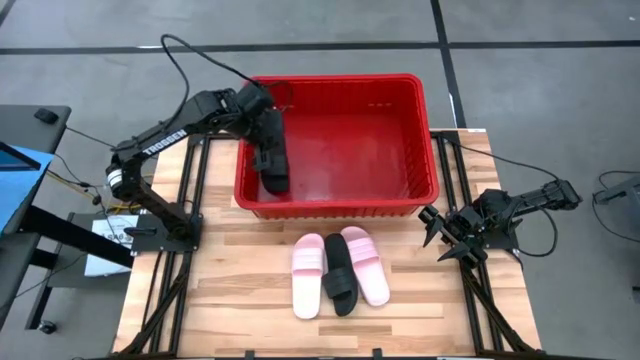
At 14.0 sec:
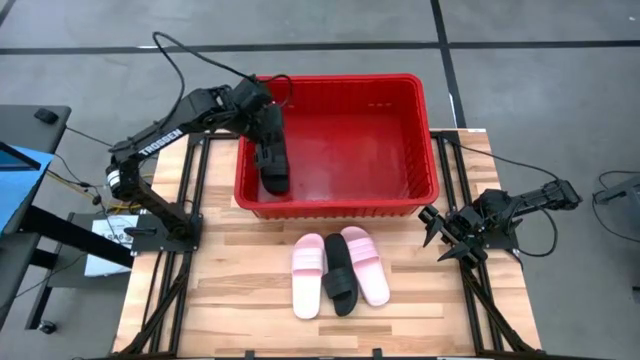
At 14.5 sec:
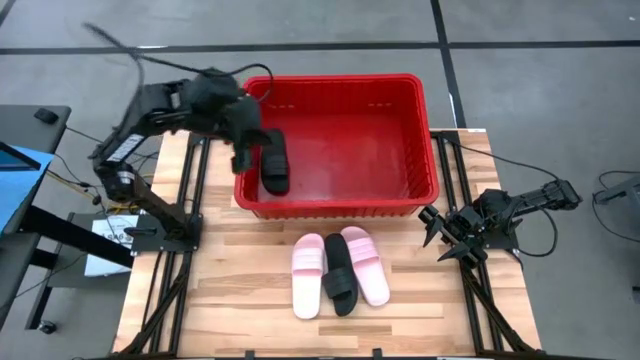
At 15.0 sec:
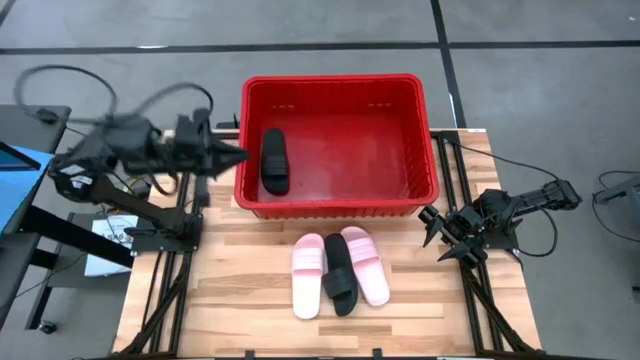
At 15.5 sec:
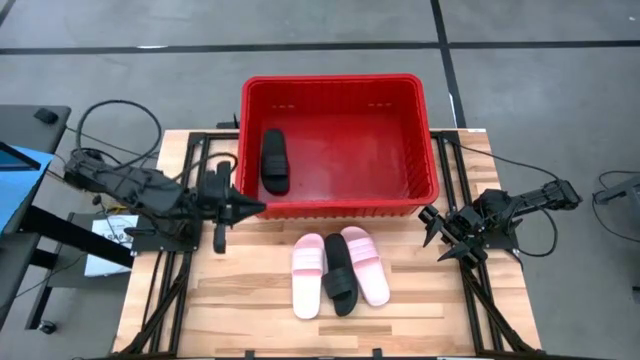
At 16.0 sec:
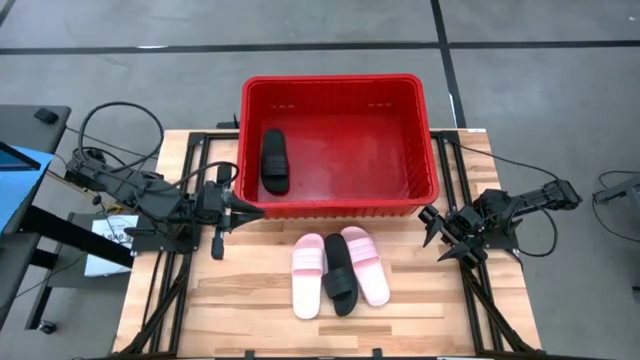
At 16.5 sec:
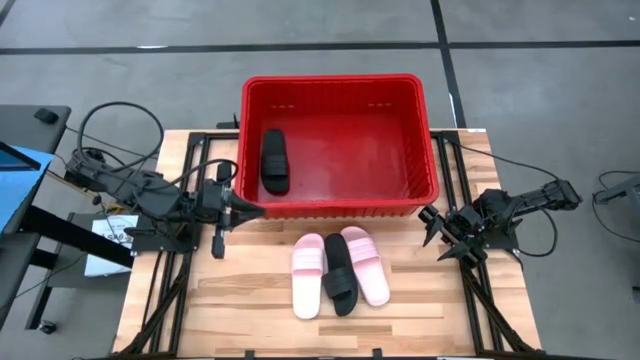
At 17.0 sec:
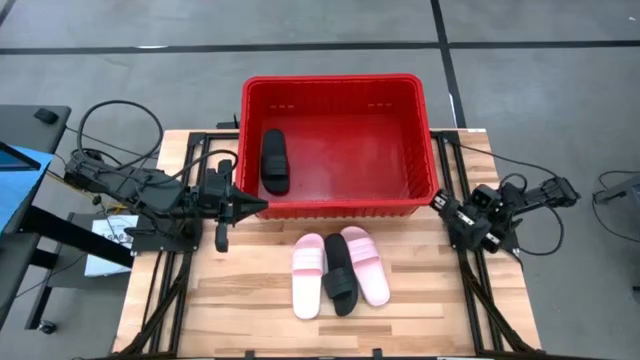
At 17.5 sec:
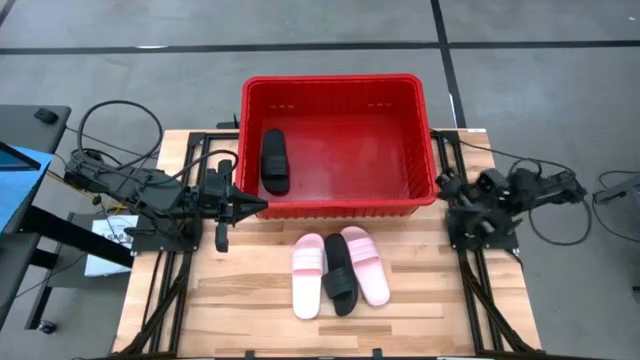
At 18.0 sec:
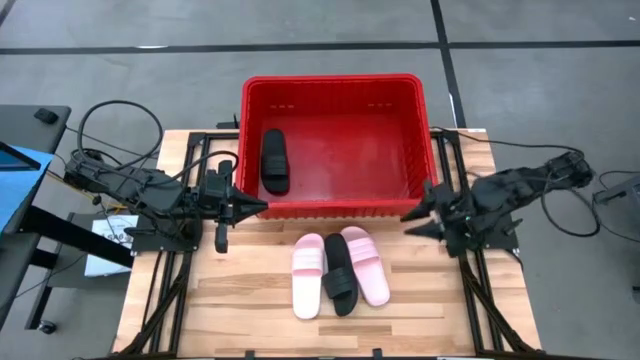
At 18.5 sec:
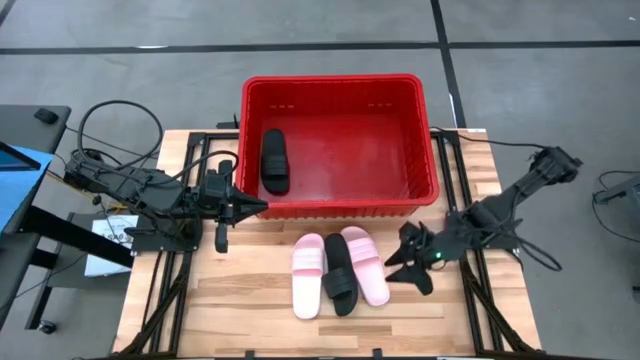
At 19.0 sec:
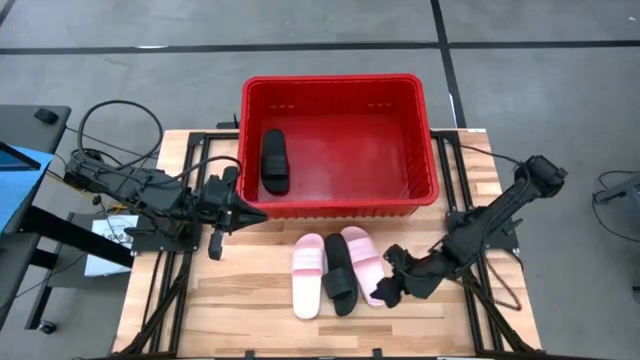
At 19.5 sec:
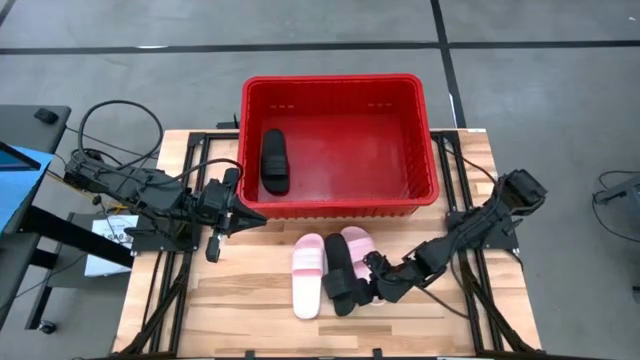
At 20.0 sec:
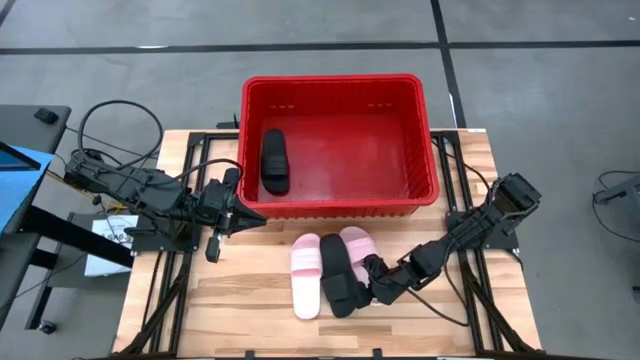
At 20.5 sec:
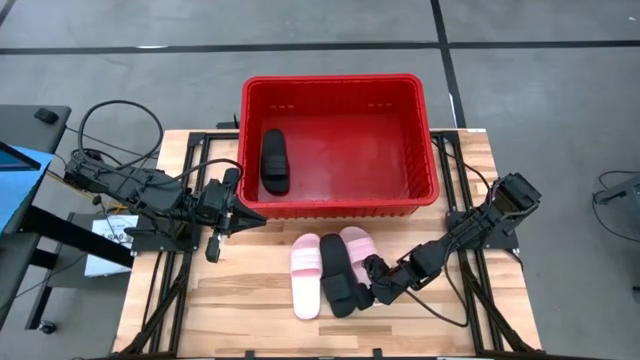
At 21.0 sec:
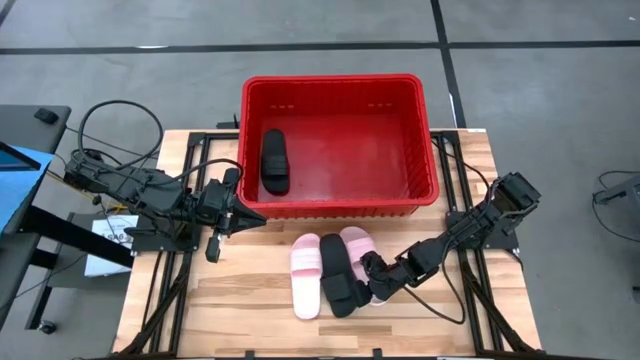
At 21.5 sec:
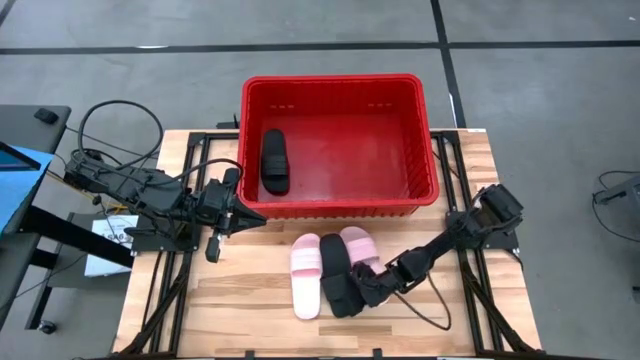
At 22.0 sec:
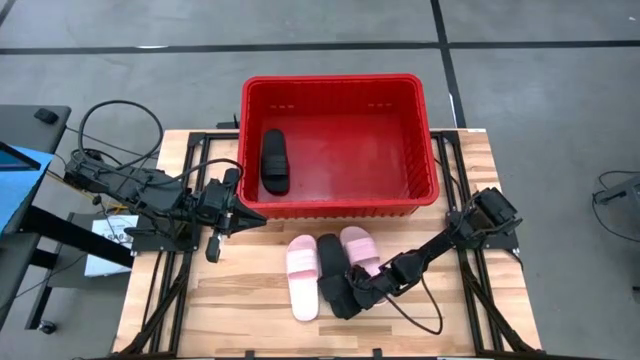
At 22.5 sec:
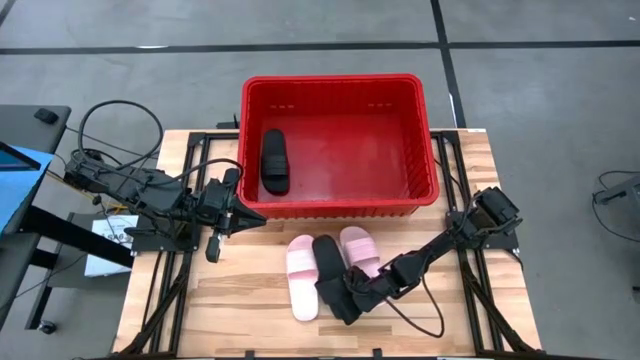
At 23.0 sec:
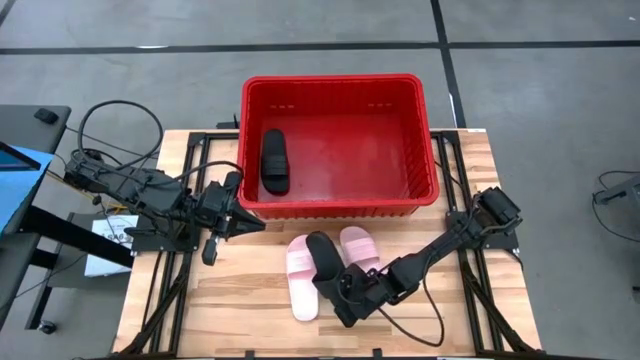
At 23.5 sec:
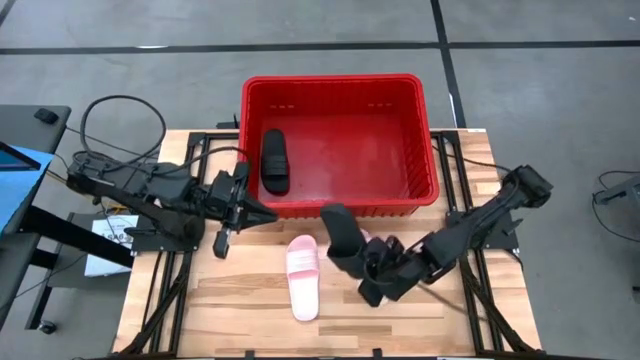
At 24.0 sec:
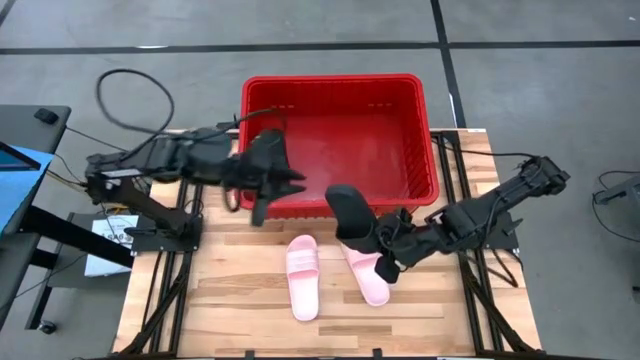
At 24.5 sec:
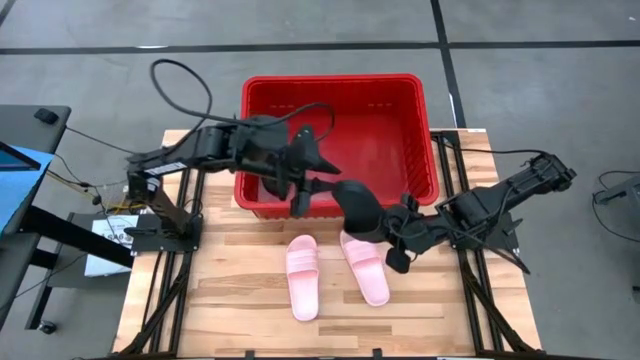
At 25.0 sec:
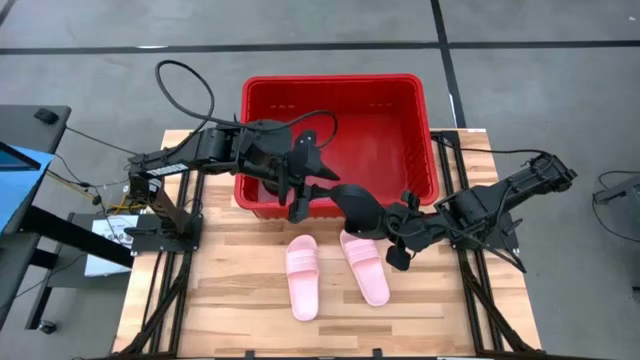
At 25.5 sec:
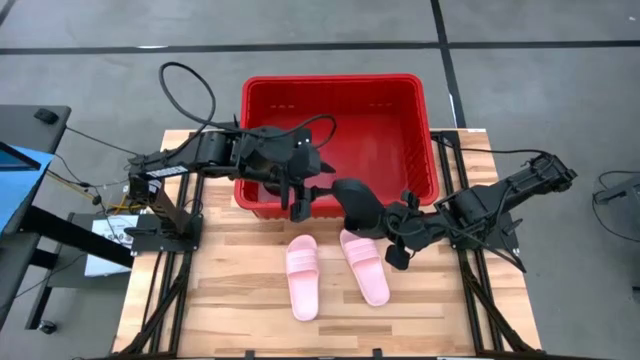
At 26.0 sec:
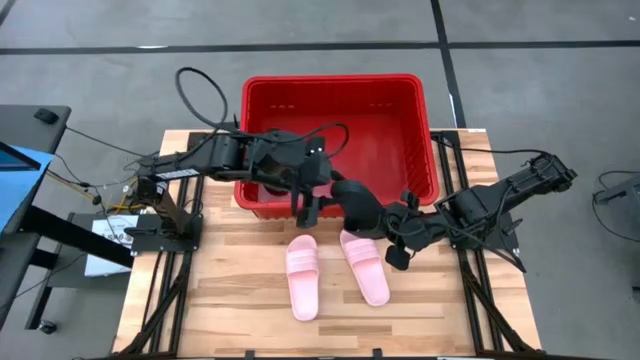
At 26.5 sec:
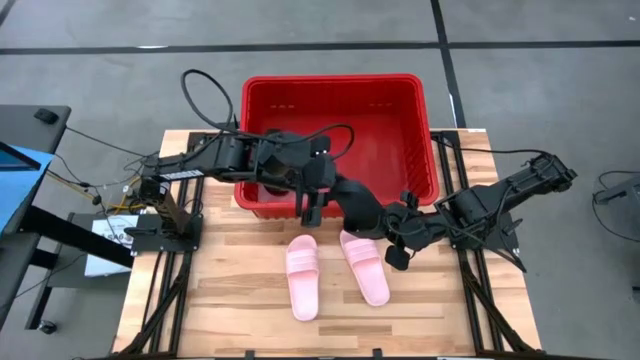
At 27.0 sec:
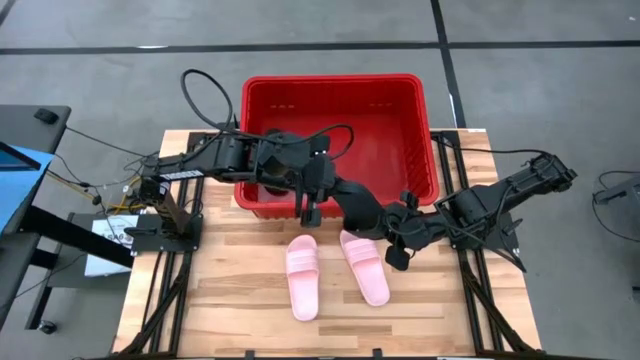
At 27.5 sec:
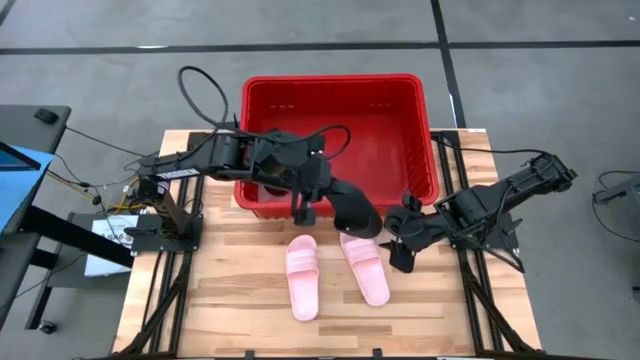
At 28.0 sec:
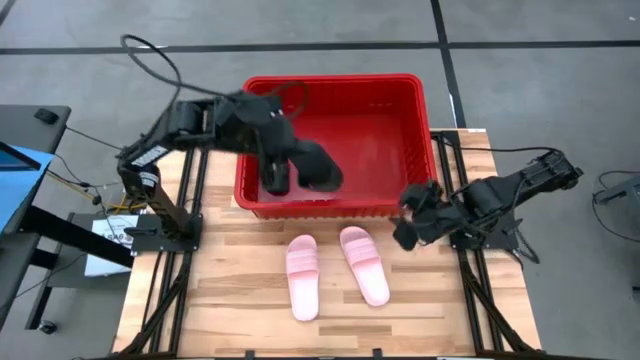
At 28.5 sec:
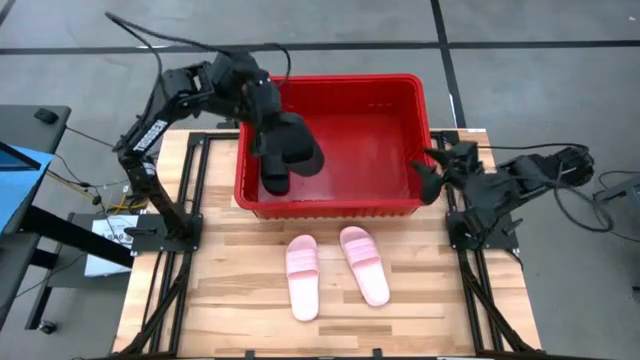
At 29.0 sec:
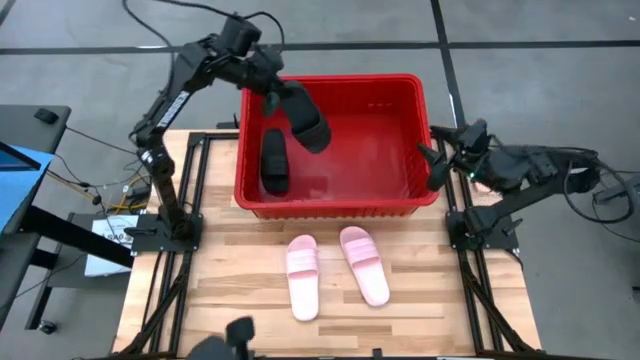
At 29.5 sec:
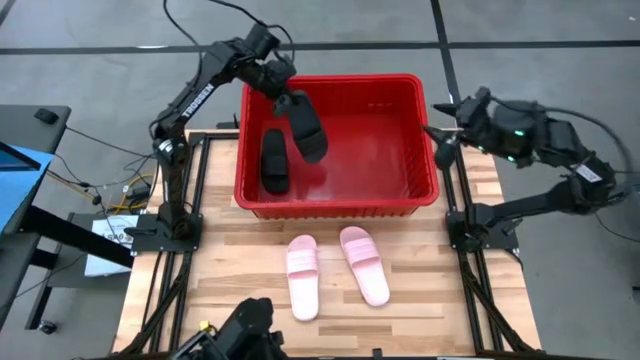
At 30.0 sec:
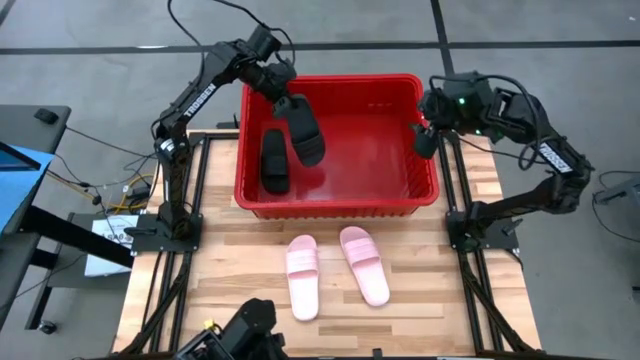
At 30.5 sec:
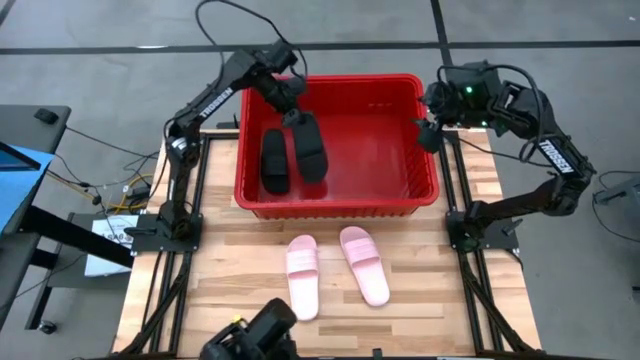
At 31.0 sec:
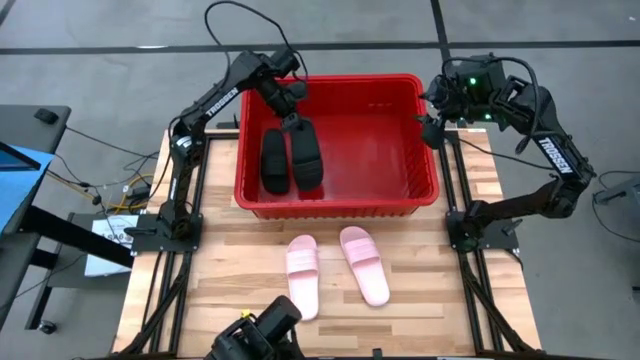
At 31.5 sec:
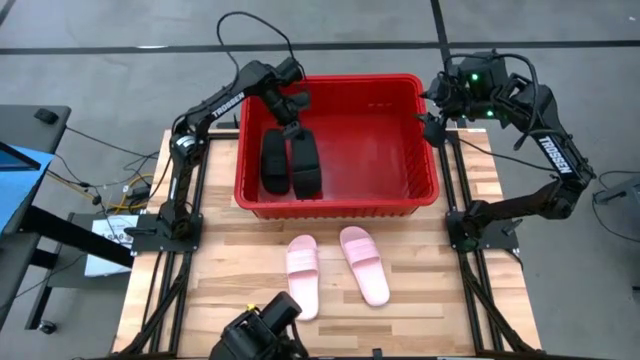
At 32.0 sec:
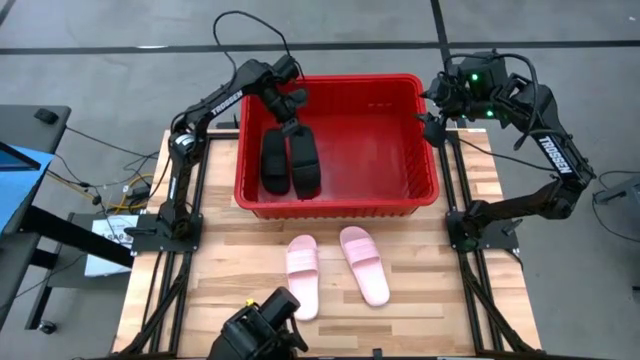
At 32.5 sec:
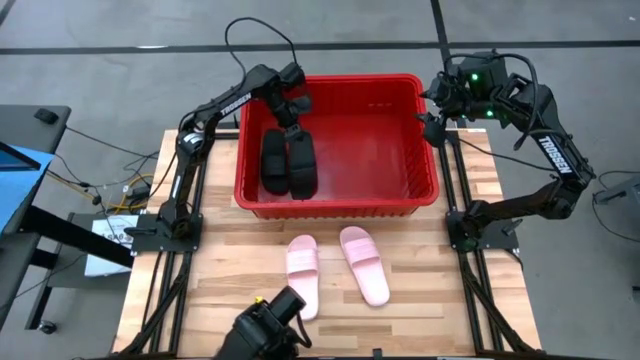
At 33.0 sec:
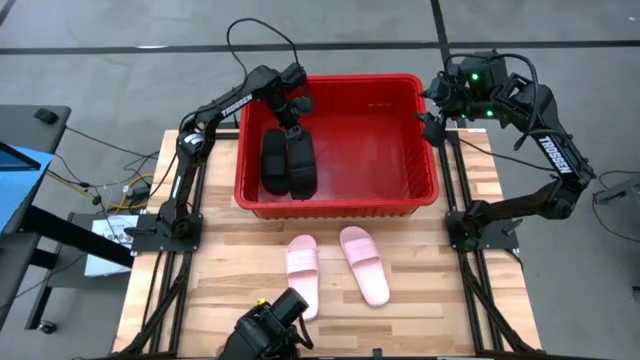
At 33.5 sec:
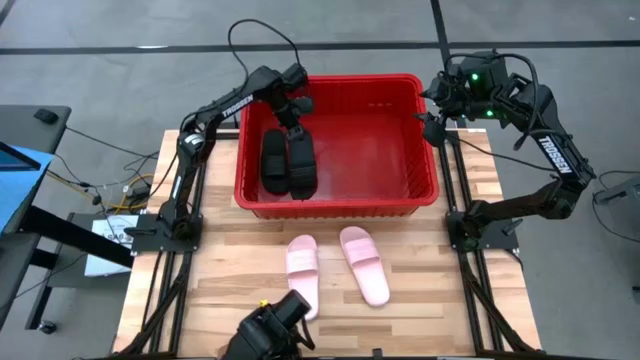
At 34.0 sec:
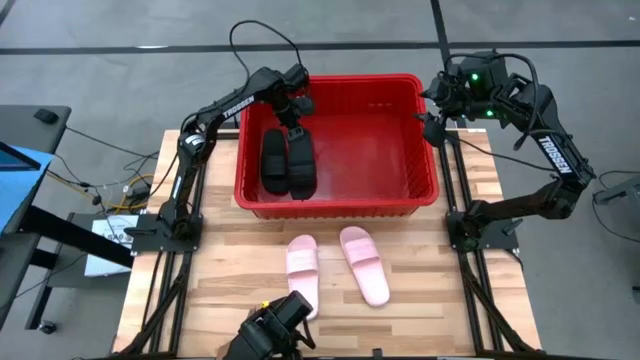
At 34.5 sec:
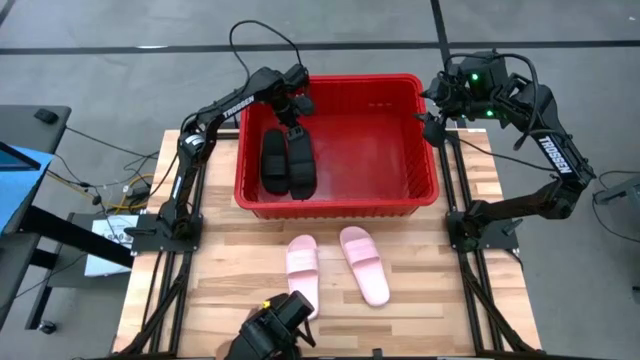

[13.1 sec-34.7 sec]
Task: Pick and place slides into bin
Put the black slide into the red bin
